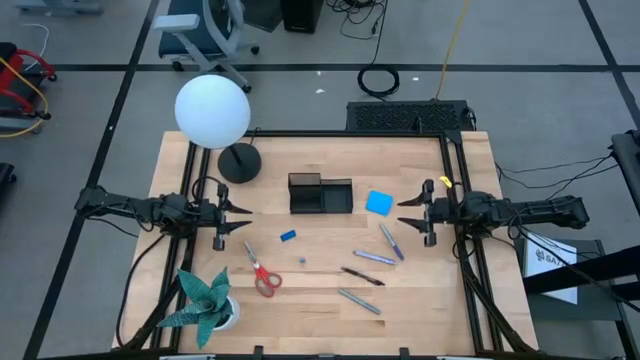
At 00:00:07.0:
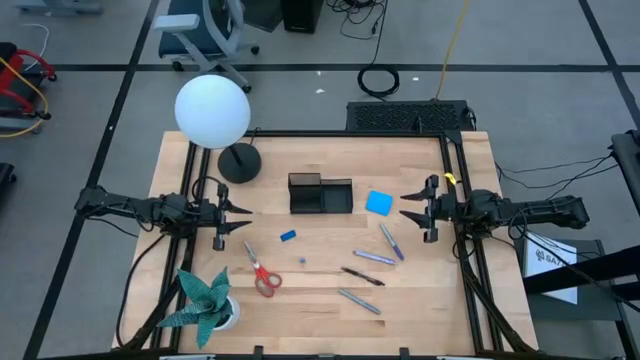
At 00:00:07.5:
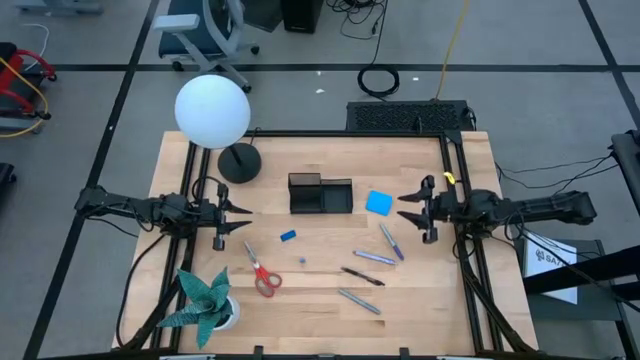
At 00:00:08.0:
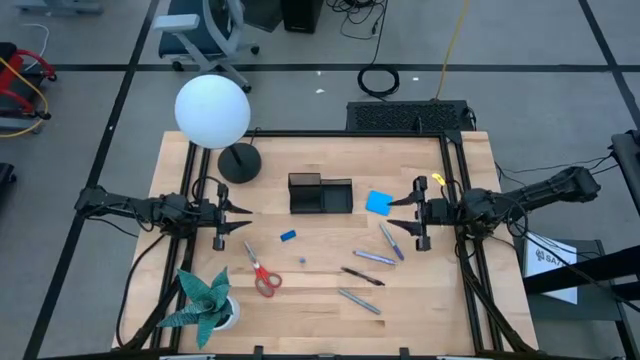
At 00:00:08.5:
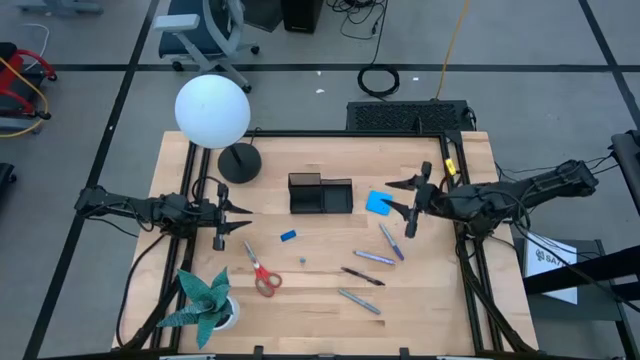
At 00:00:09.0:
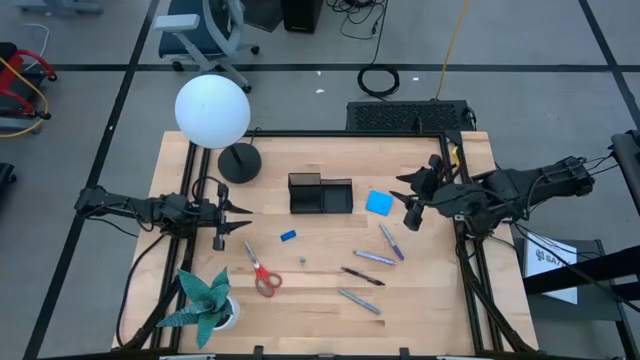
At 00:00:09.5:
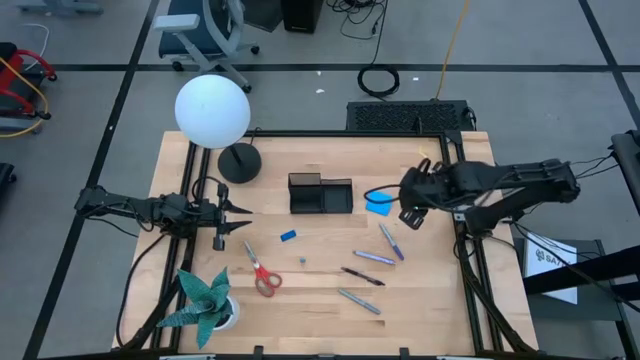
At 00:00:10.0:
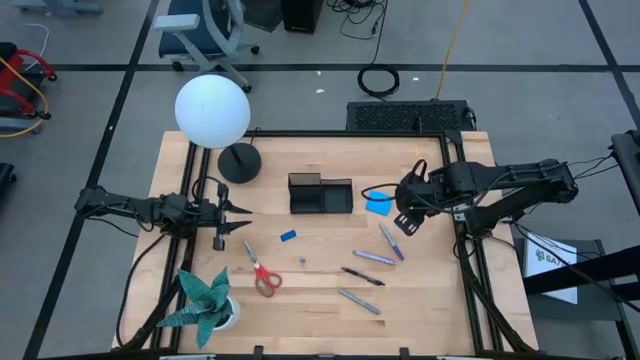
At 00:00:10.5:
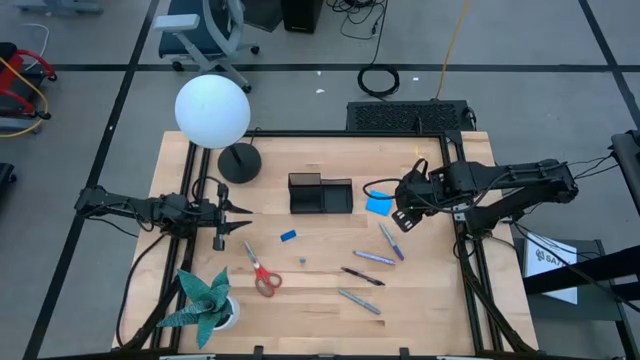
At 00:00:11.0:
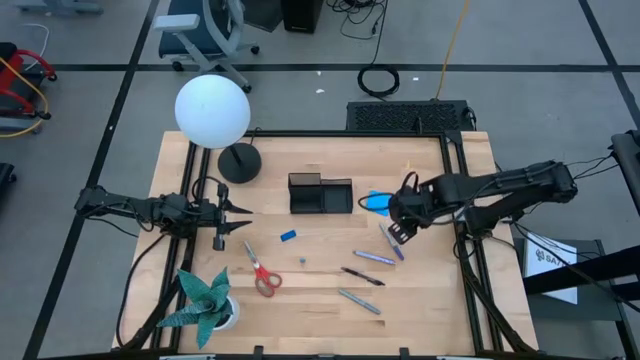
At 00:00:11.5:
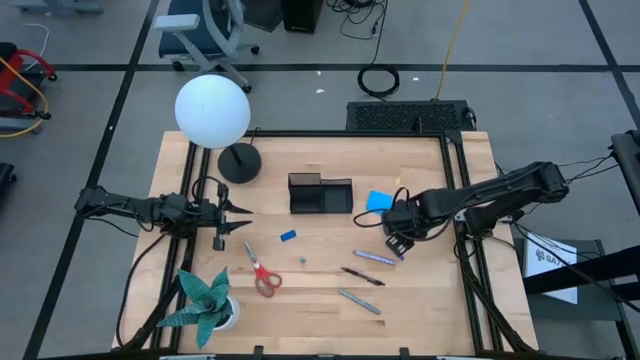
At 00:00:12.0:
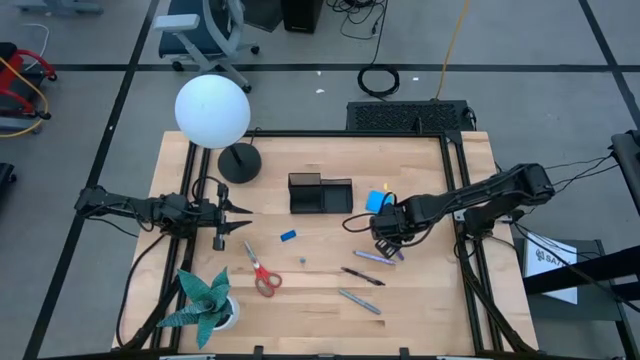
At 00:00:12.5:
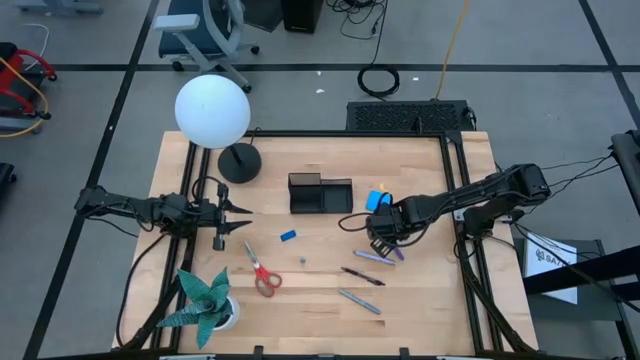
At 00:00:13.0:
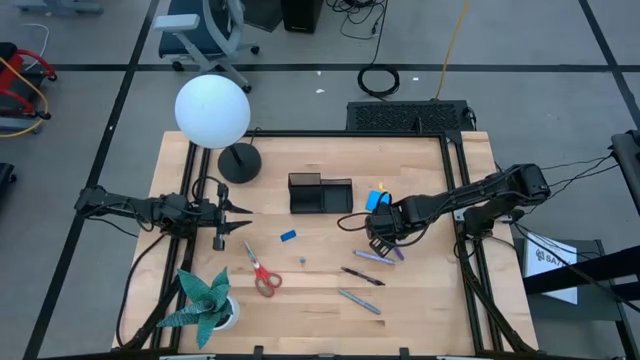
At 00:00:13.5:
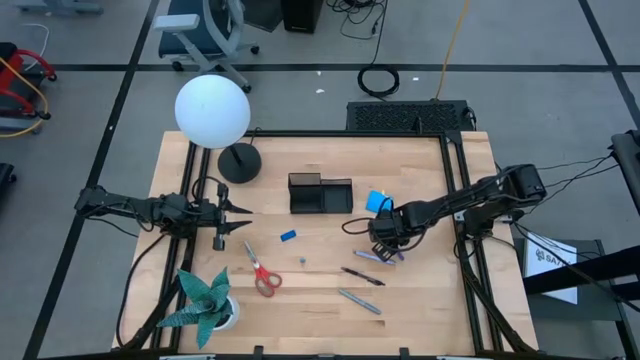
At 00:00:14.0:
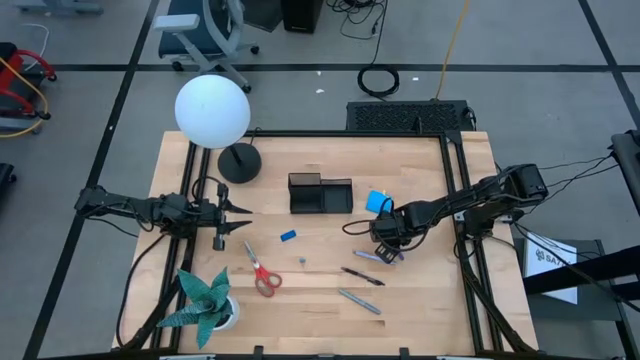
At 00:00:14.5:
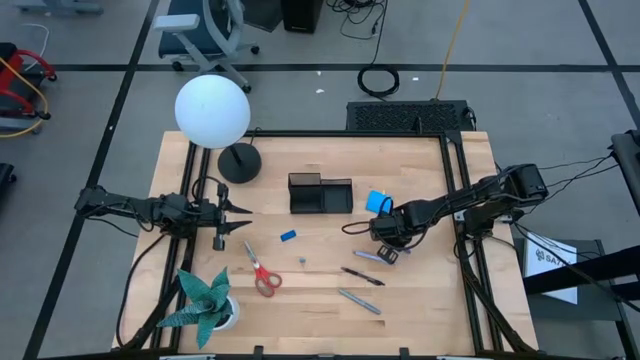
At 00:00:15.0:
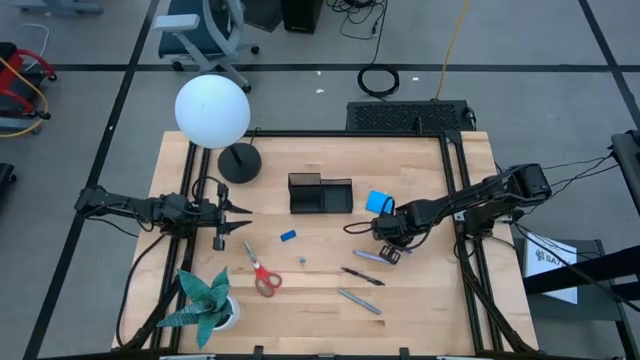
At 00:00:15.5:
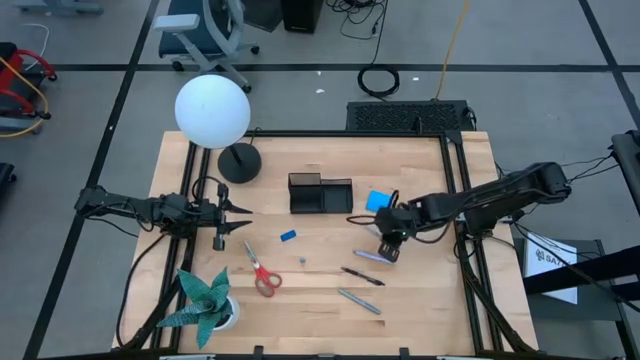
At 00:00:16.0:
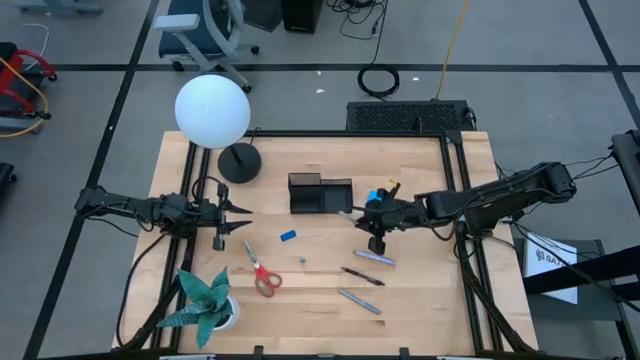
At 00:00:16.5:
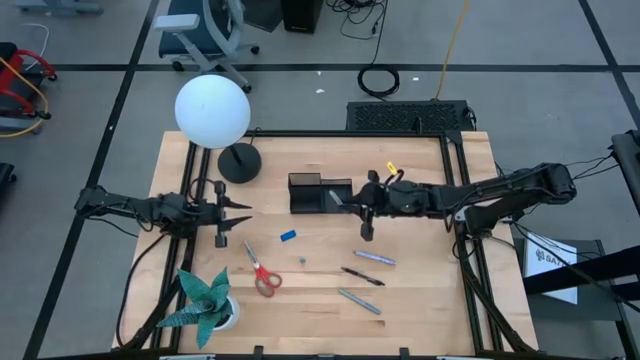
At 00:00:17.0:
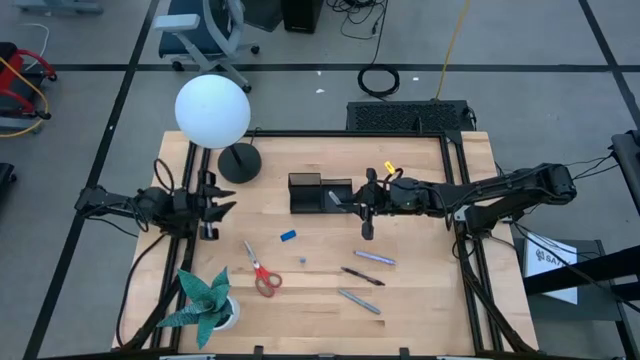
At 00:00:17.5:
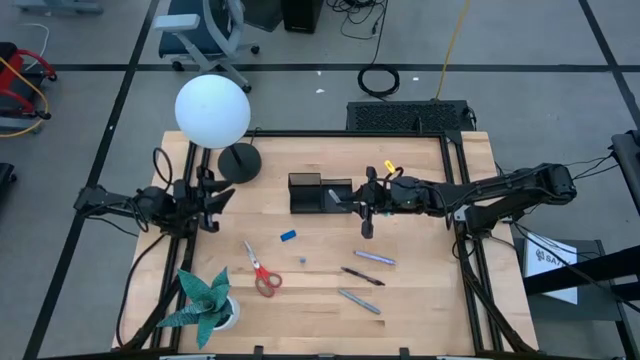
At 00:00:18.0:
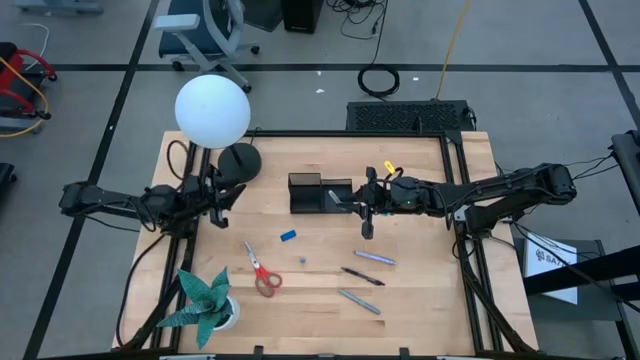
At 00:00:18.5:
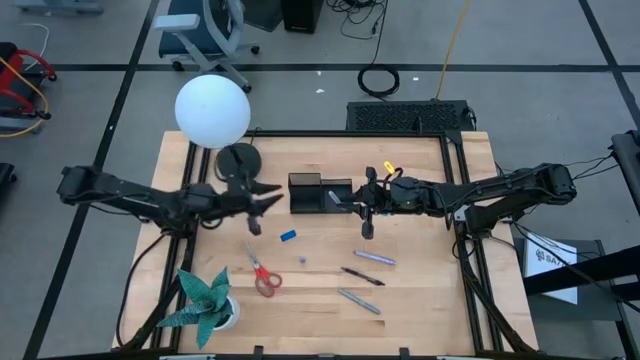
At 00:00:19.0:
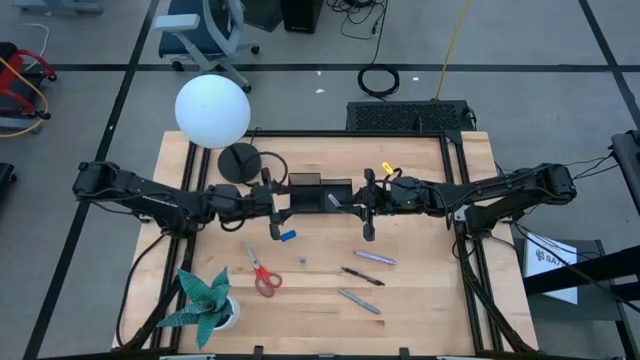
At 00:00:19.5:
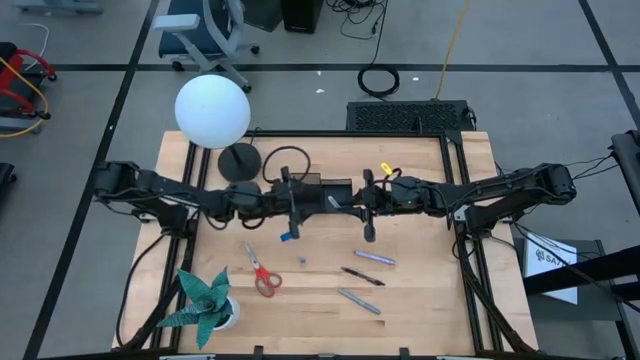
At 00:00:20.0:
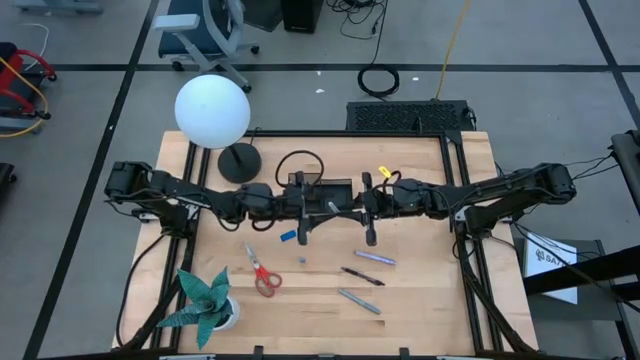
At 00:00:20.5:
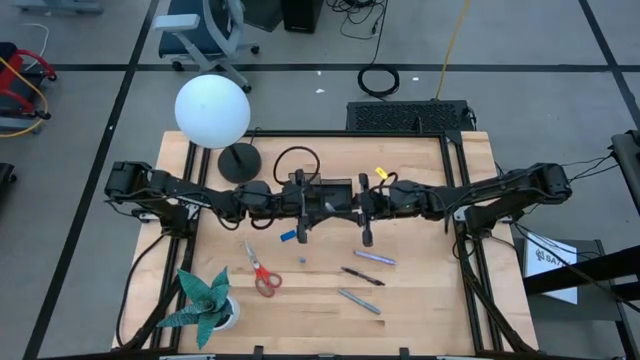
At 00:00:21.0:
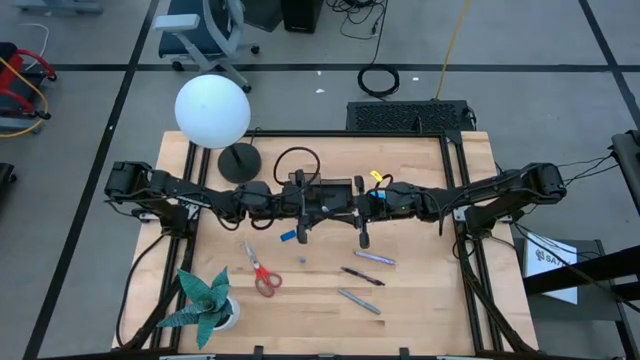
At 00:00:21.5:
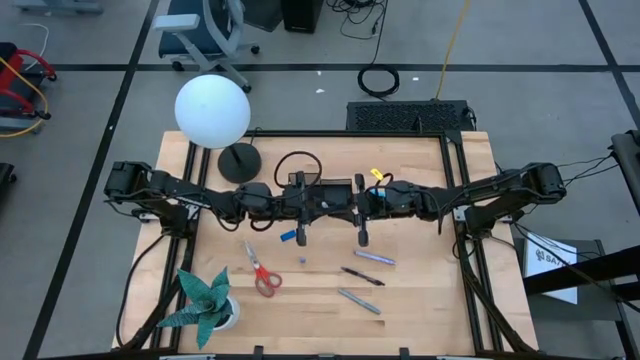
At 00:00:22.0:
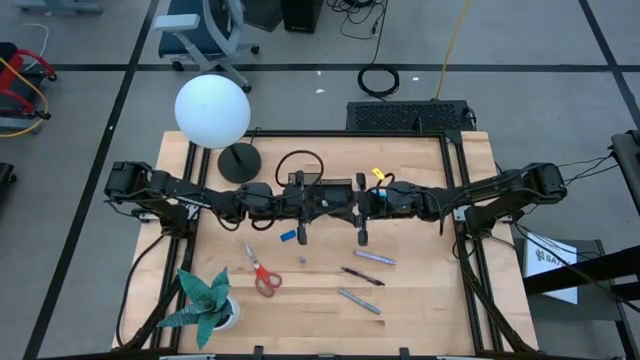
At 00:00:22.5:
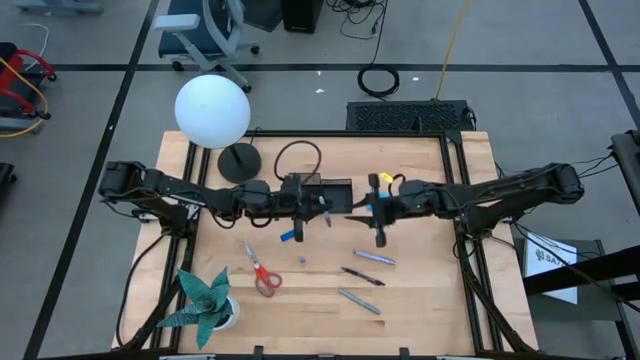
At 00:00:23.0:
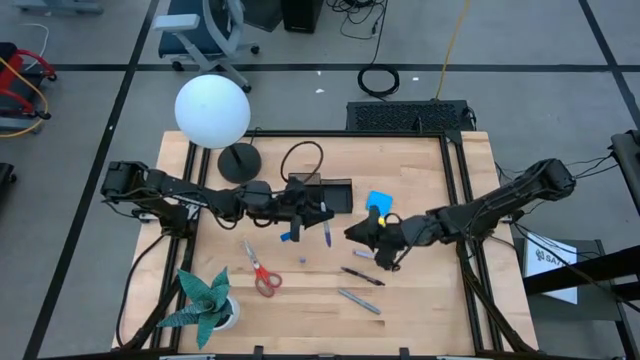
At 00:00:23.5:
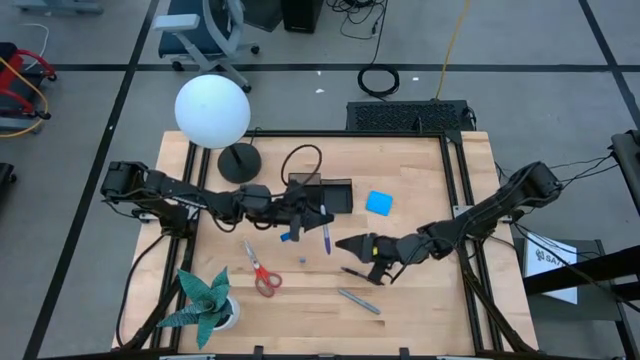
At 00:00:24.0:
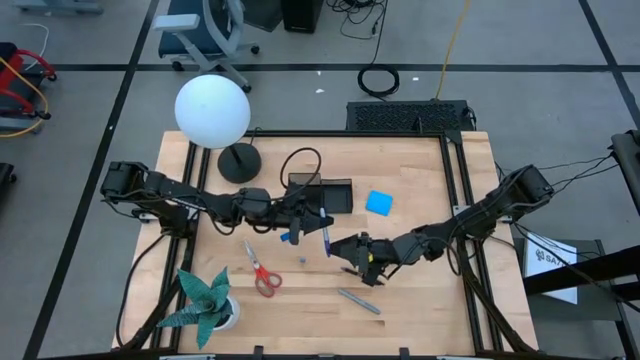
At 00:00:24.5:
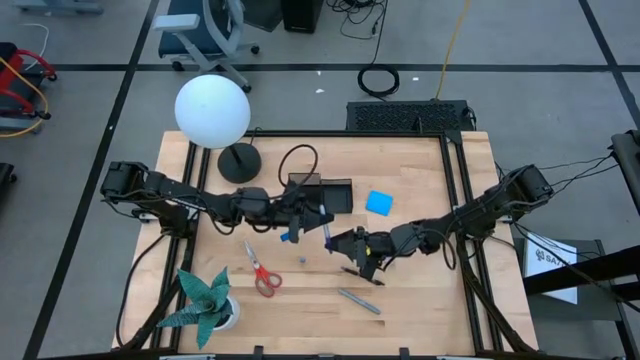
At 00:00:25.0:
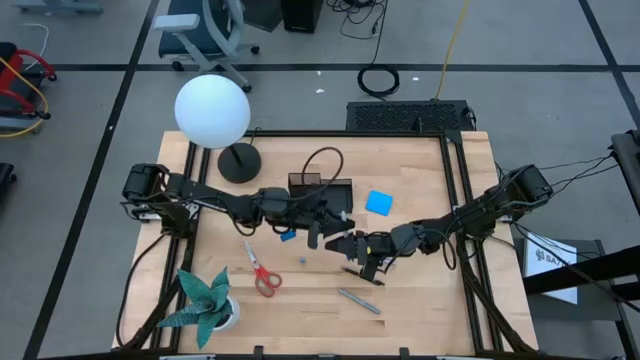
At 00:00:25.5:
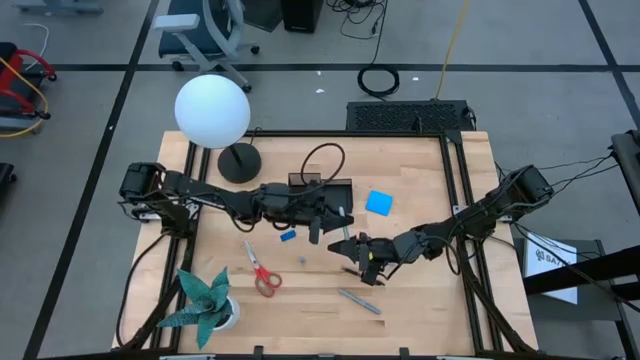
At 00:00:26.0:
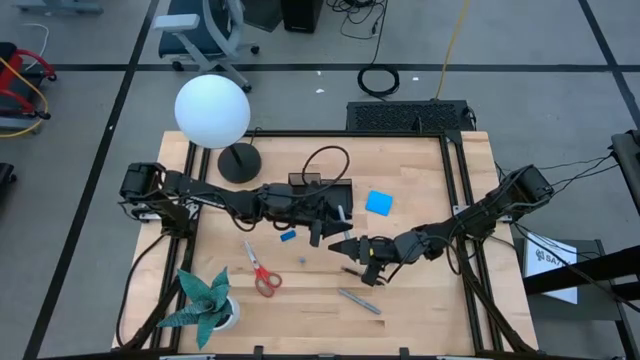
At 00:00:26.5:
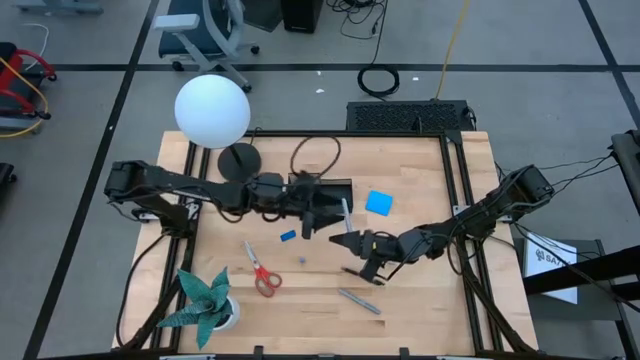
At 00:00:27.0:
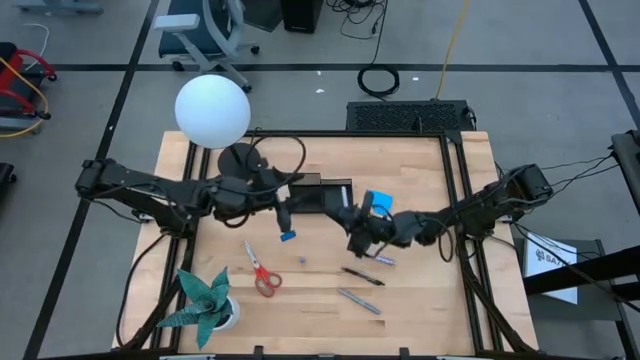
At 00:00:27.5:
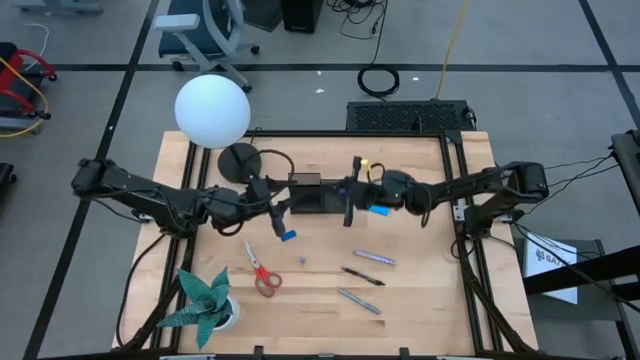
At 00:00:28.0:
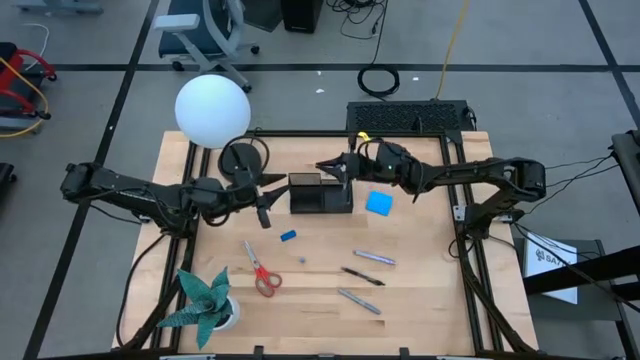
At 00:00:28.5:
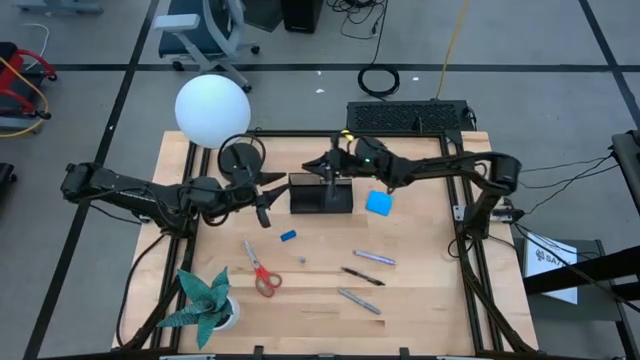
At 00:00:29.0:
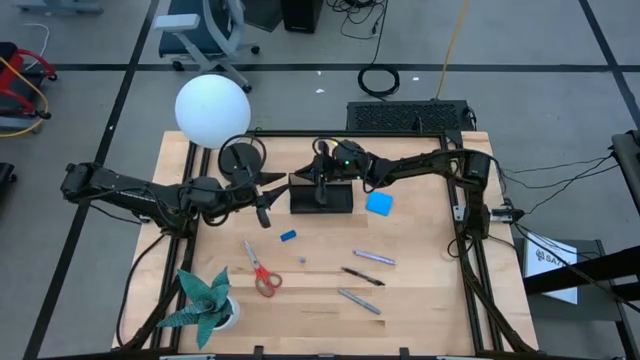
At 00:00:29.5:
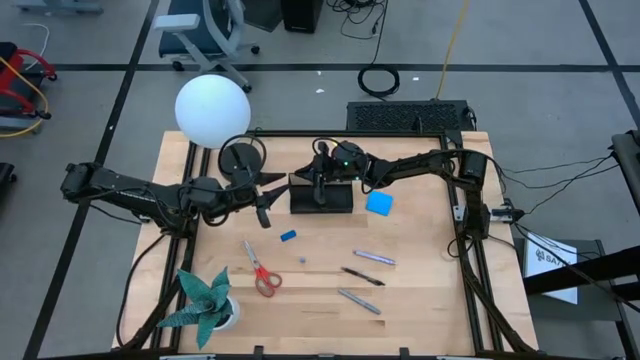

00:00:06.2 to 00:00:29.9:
Task: Pick and place office supplies into organizer
Put the purple highlighter into the black desk organizer
